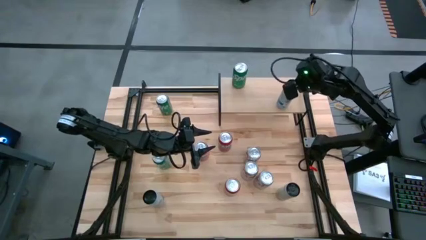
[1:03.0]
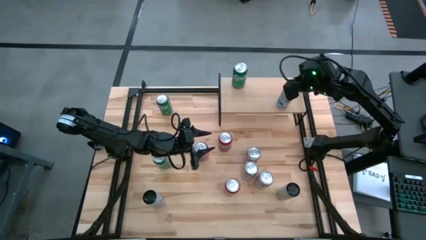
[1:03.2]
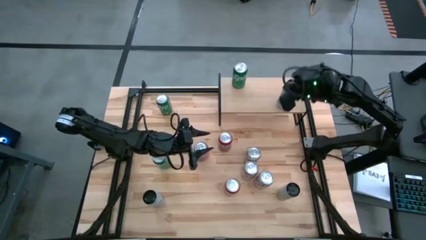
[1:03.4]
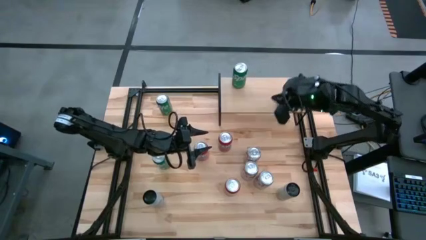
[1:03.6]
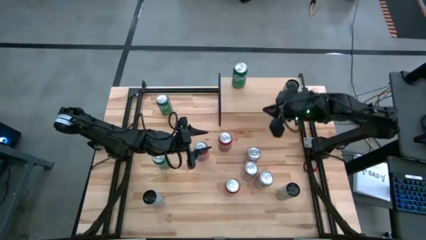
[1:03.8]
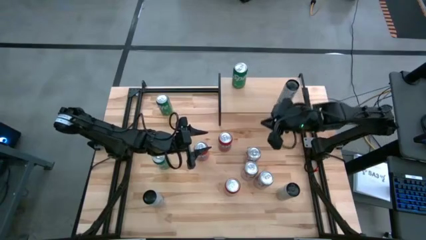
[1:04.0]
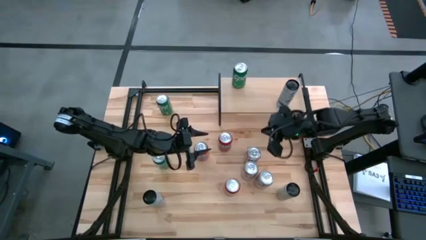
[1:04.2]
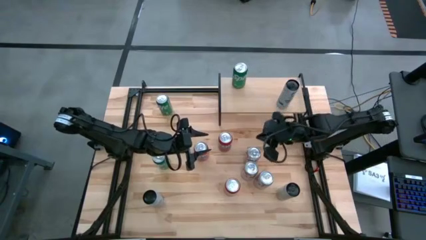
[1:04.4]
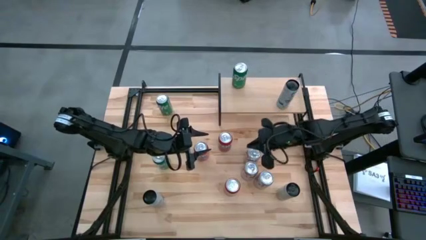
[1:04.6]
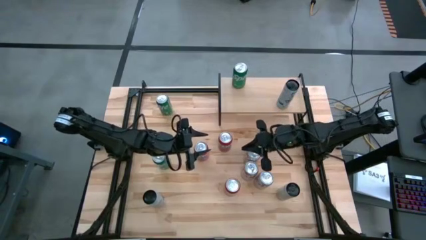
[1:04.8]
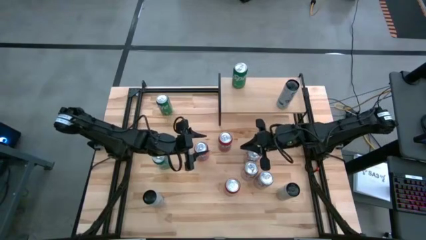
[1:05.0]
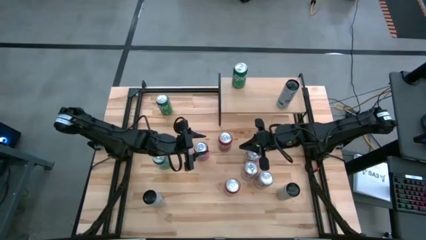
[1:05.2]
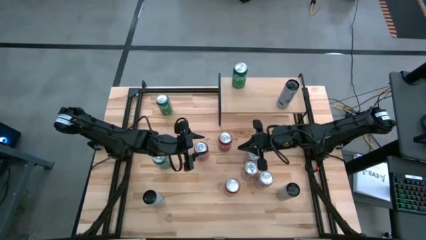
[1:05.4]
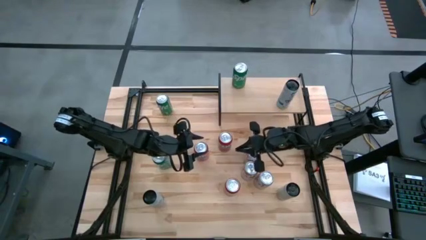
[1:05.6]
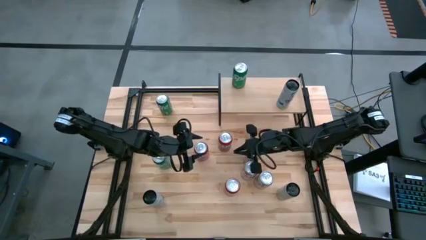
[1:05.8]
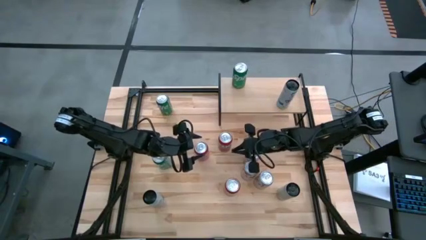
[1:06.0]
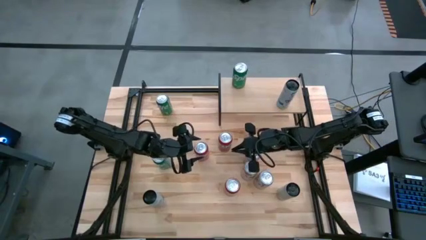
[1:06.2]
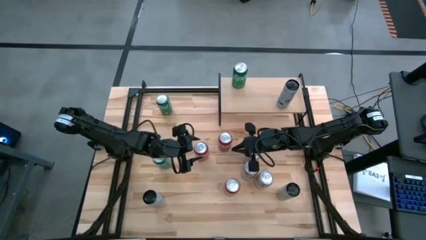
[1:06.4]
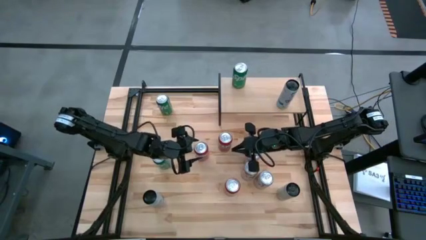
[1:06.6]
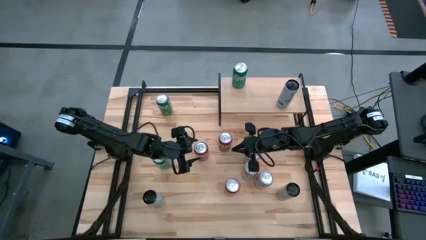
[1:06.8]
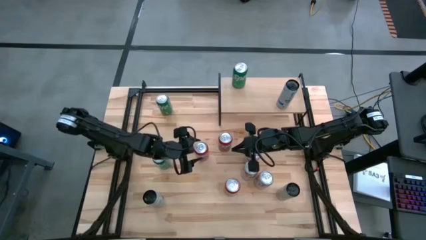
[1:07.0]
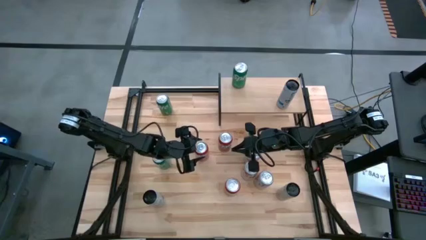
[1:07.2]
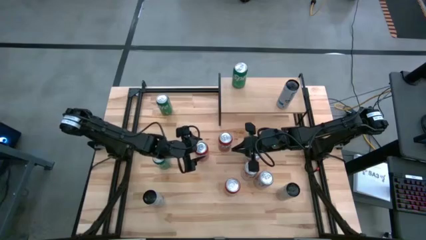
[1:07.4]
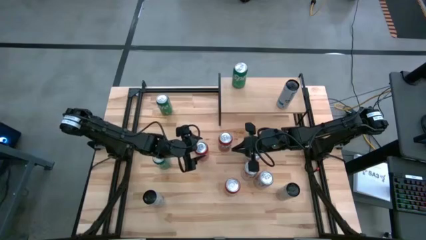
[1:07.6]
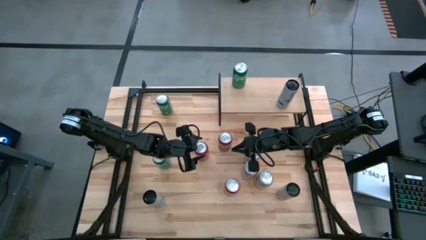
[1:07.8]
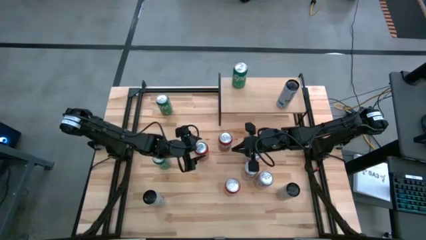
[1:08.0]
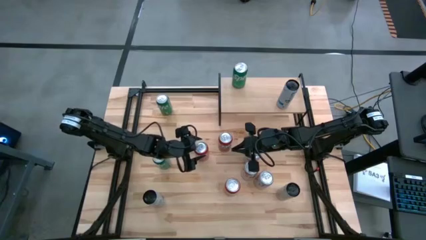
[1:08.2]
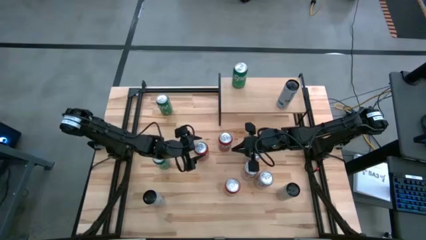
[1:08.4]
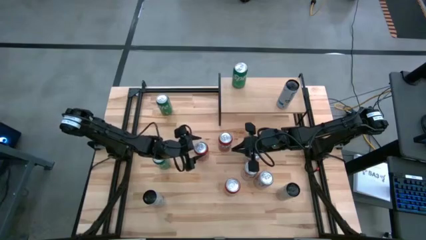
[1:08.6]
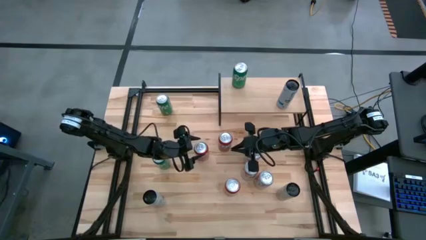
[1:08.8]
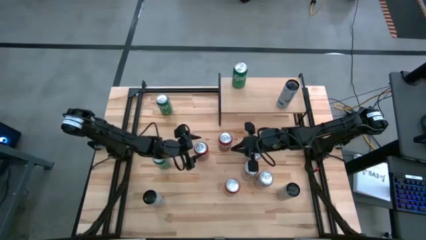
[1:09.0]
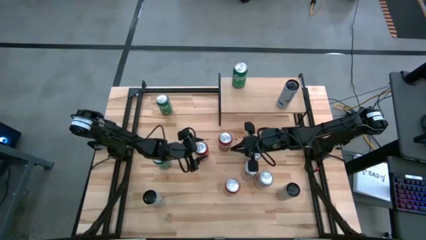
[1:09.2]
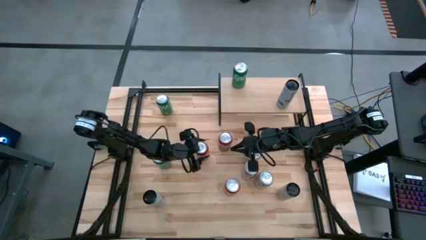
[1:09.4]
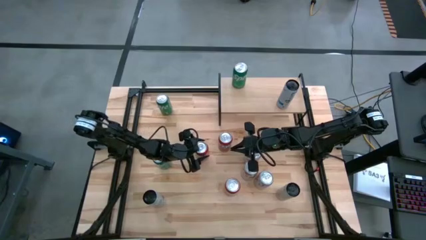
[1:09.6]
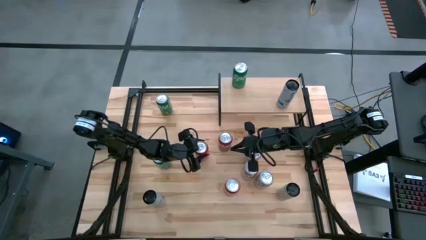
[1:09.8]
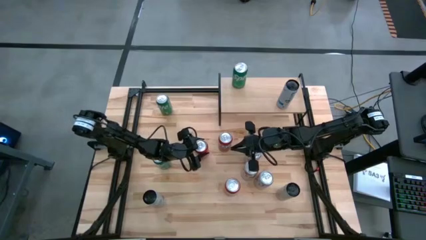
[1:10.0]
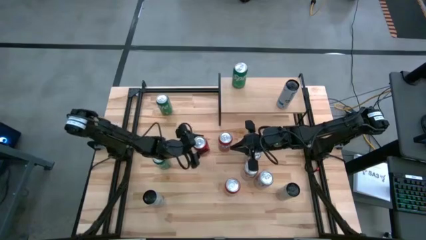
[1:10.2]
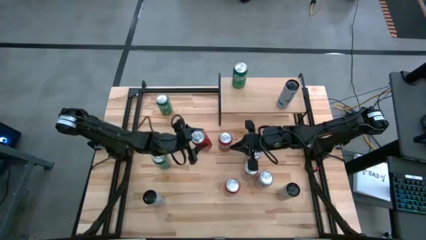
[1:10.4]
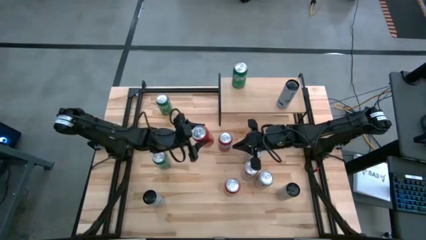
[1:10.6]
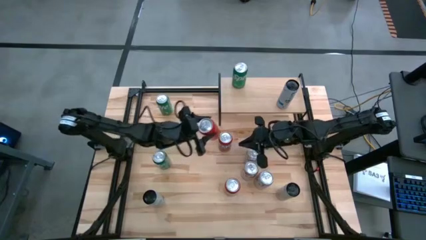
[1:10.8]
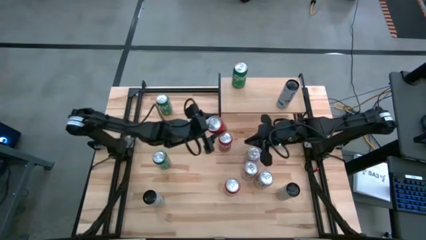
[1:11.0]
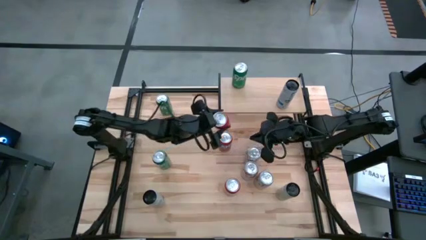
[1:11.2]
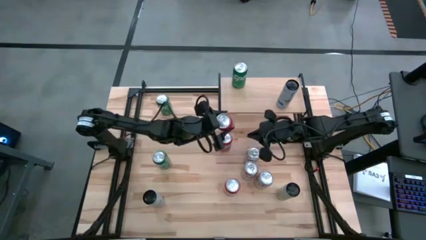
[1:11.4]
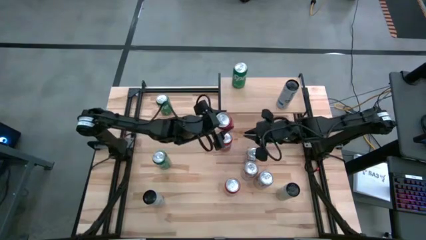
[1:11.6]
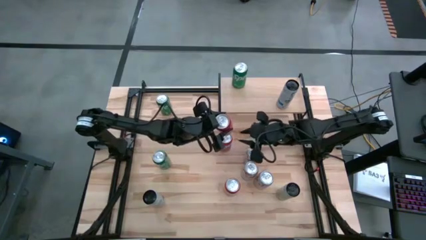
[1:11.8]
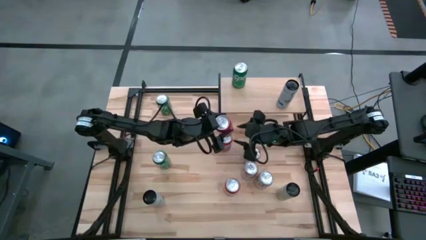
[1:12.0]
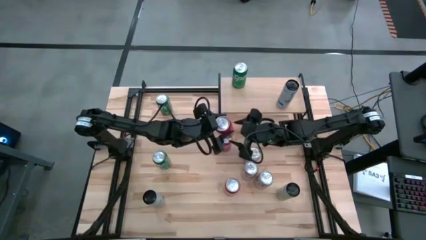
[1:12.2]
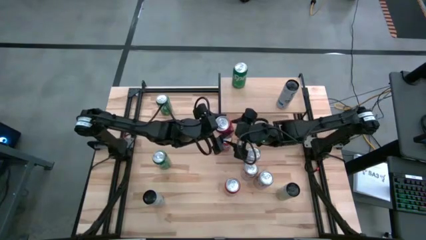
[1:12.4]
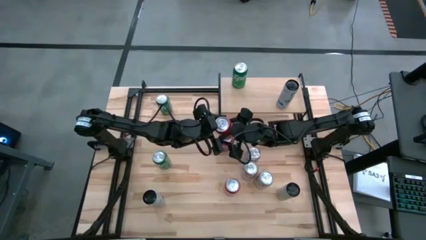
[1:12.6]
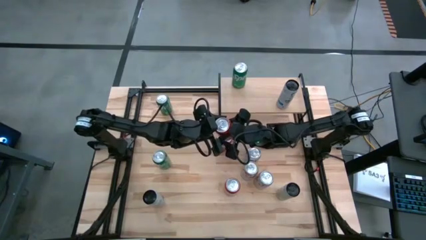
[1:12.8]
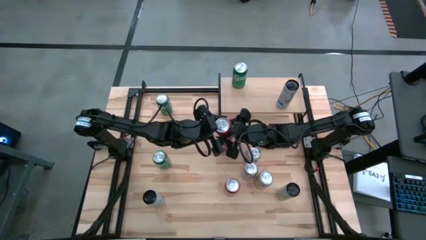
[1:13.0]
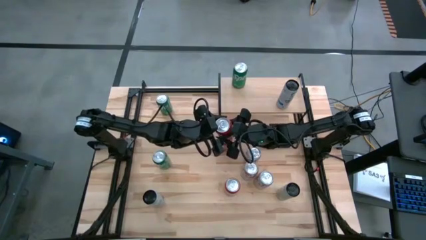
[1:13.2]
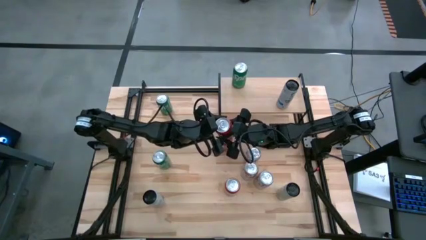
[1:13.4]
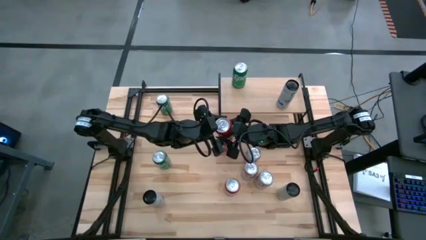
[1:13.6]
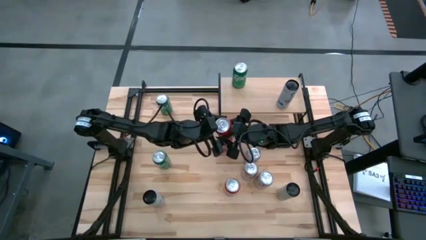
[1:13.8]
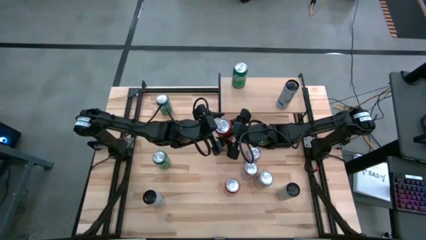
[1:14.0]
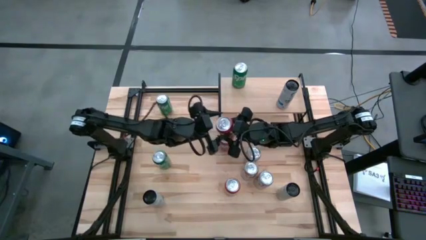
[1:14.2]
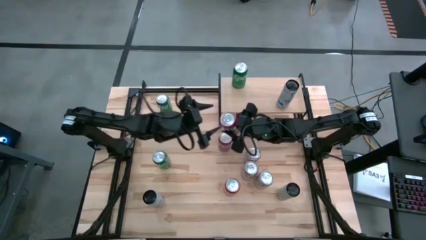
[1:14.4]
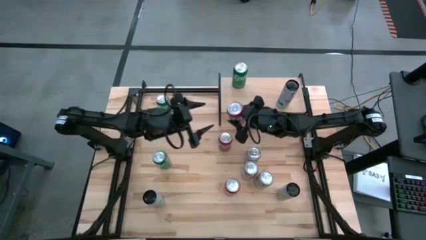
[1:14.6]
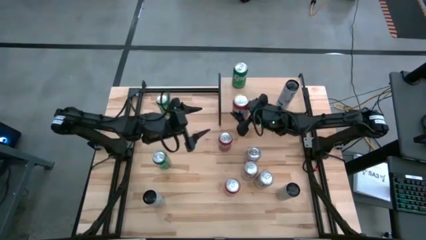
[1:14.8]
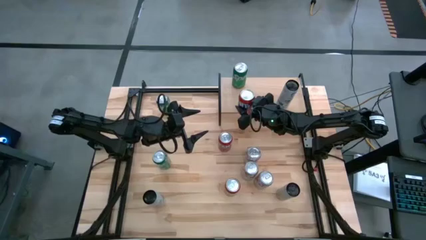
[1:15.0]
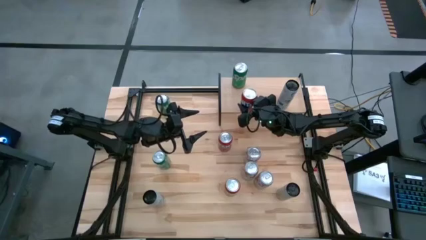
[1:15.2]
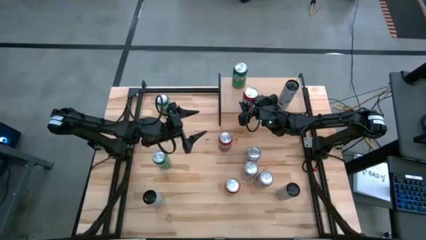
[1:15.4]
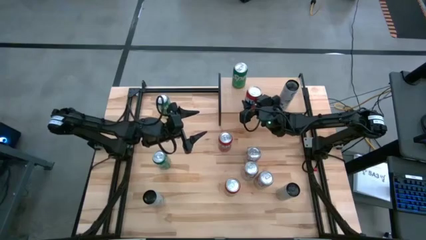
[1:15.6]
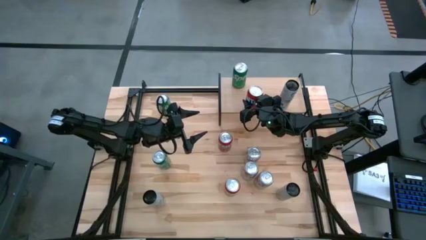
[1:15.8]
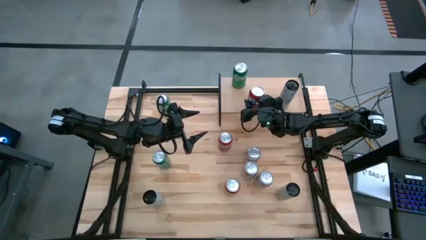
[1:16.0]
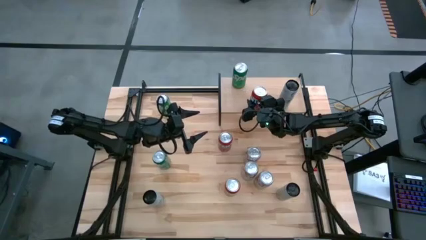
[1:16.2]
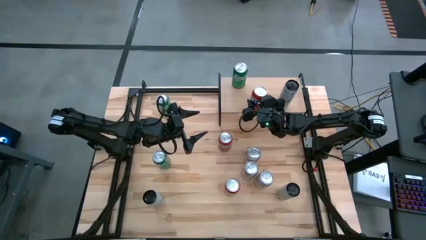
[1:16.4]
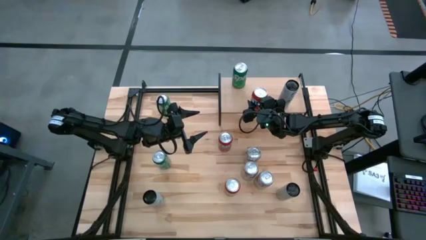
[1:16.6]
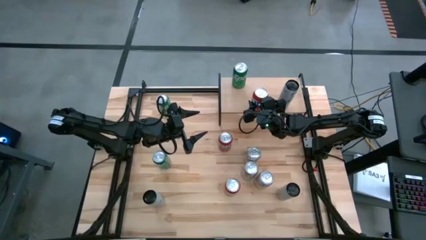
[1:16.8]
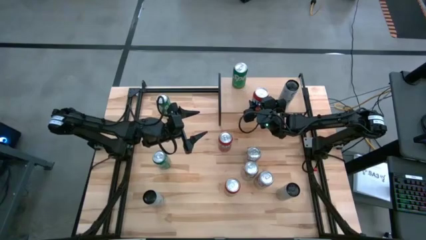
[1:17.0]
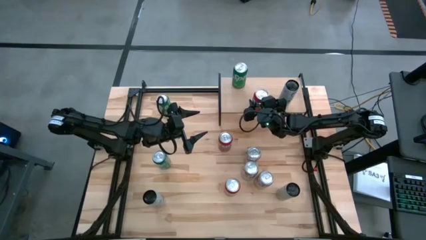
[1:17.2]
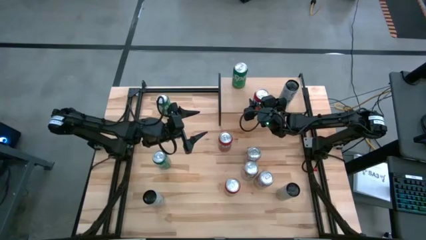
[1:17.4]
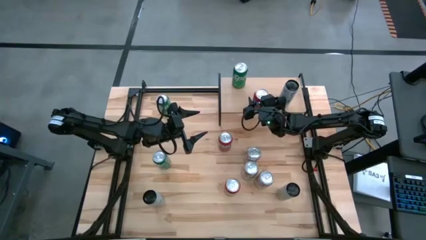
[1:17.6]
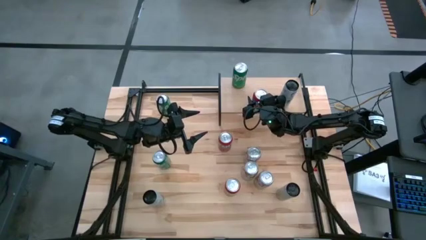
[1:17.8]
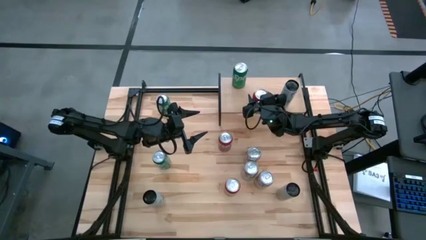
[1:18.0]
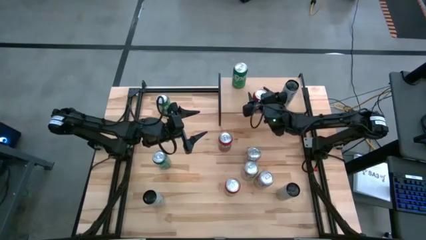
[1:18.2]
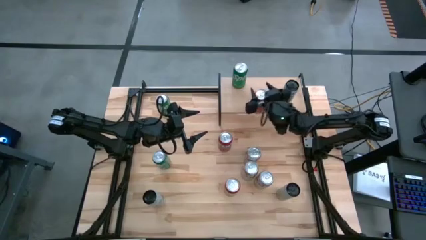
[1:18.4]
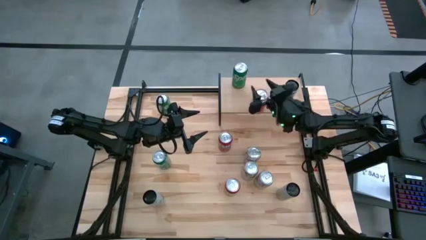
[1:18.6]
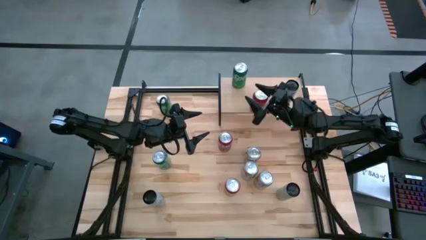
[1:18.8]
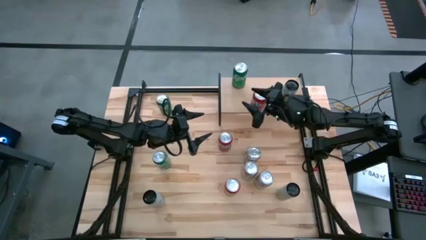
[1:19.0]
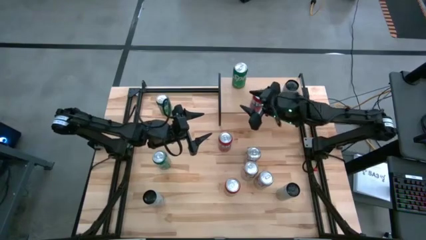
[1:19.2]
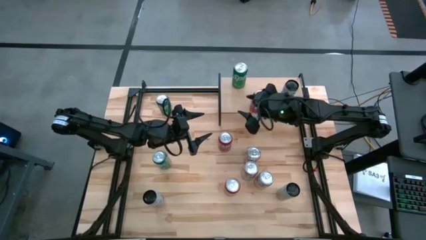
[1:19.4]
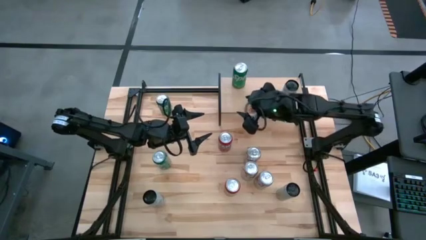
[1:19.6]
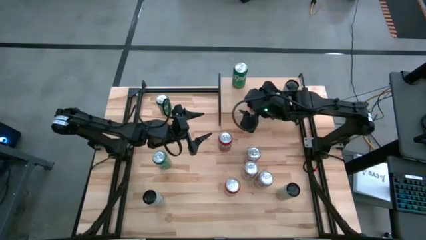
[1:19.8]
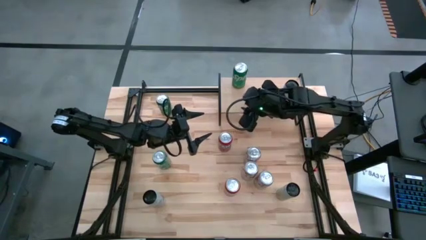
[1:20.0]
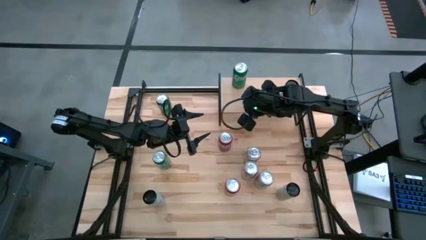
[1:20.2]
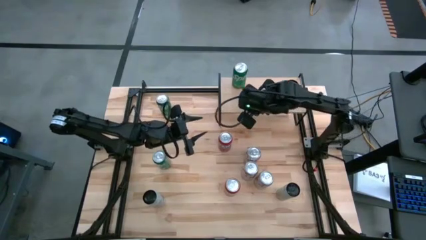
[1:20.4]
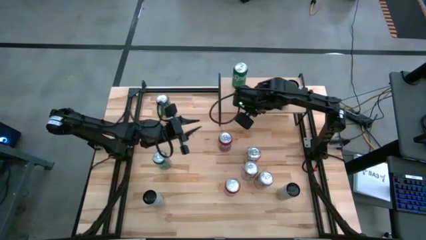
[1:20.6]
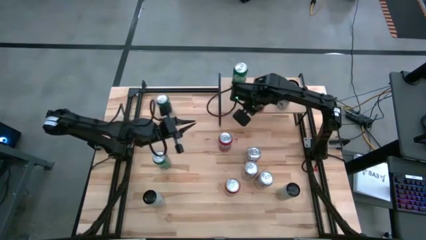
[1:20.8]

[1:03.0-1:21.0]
Task: Place canned beverage on shelf
Put the top left orange soda can on the shelf
